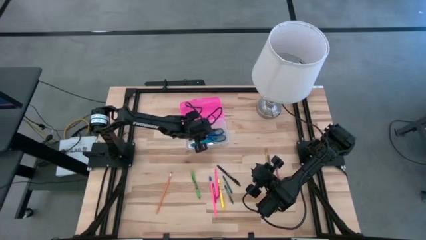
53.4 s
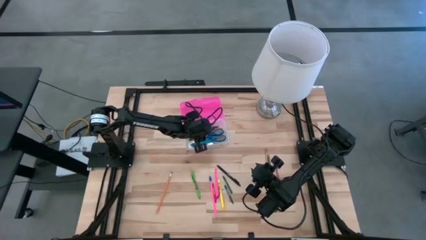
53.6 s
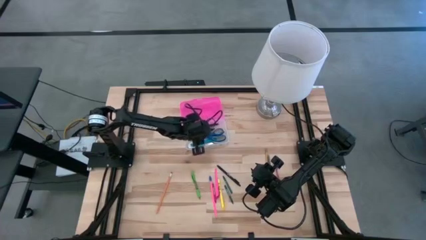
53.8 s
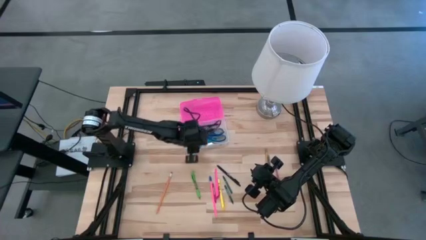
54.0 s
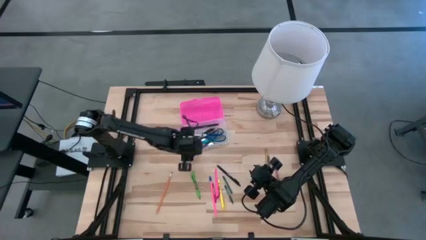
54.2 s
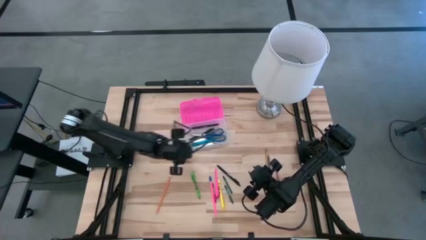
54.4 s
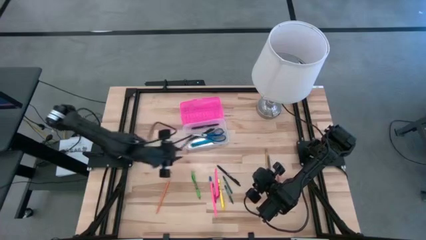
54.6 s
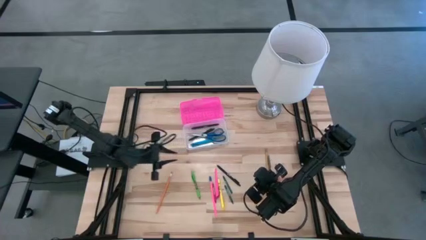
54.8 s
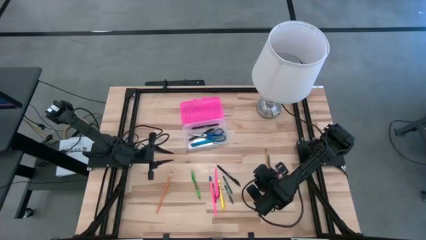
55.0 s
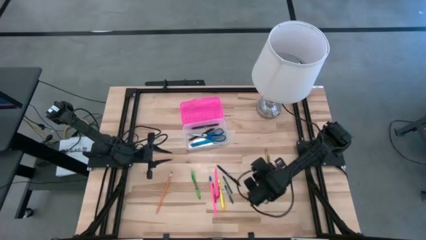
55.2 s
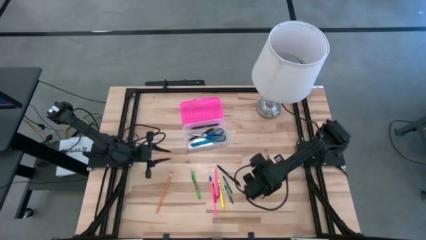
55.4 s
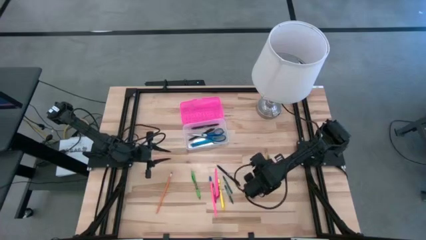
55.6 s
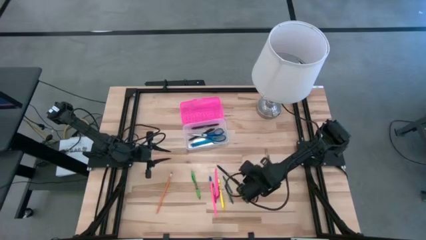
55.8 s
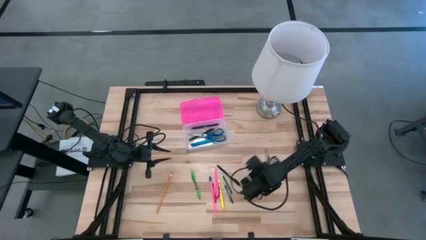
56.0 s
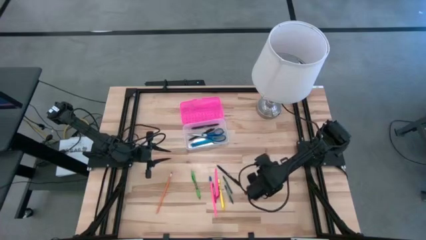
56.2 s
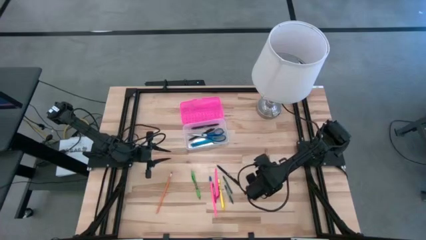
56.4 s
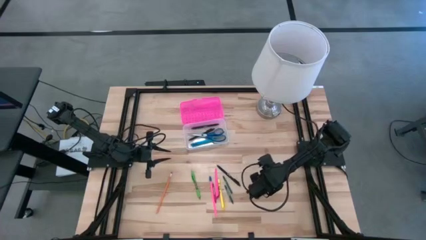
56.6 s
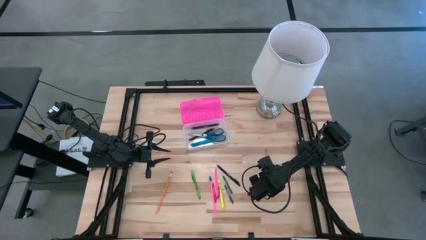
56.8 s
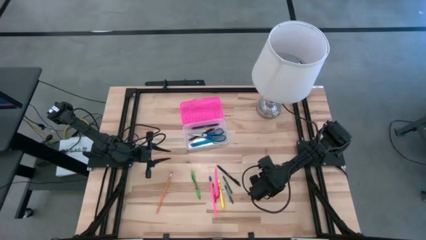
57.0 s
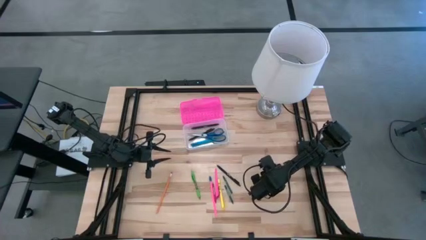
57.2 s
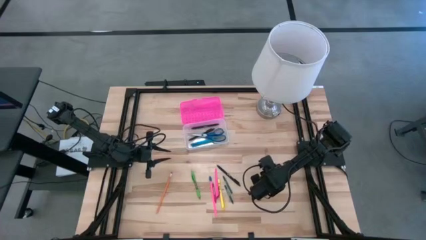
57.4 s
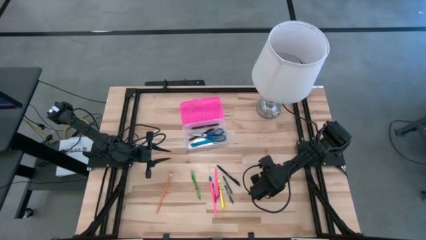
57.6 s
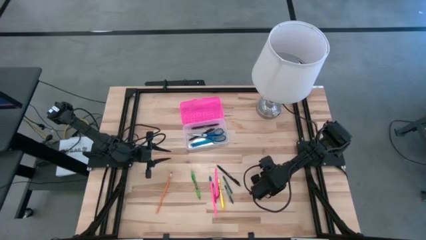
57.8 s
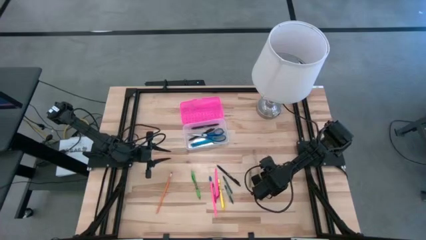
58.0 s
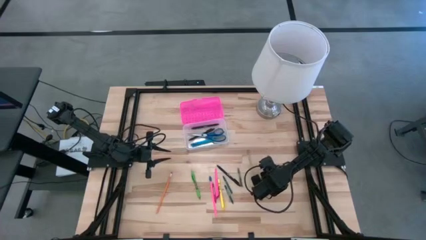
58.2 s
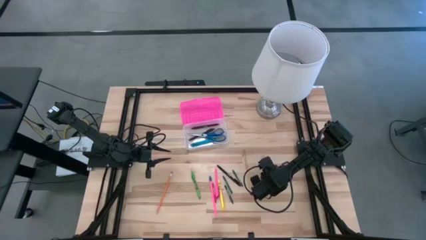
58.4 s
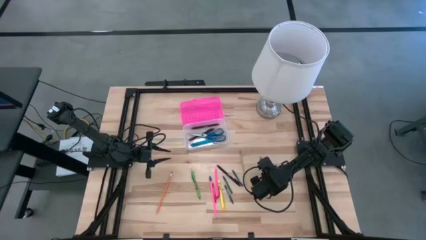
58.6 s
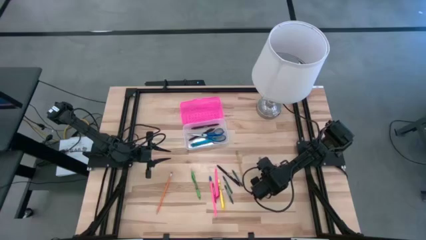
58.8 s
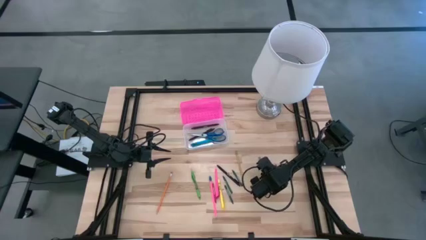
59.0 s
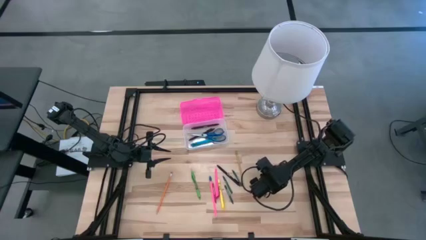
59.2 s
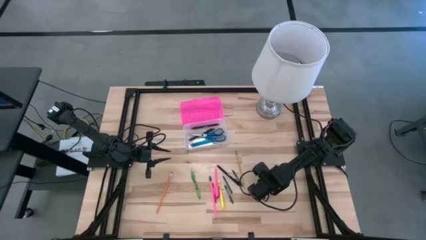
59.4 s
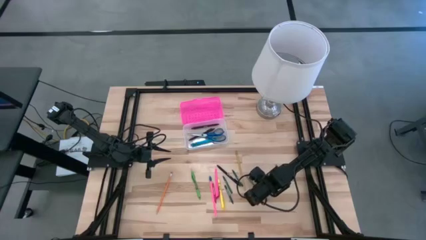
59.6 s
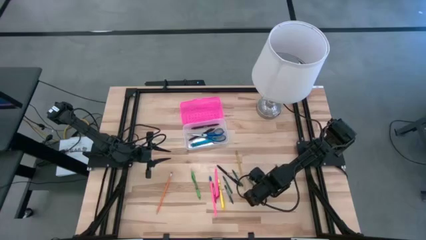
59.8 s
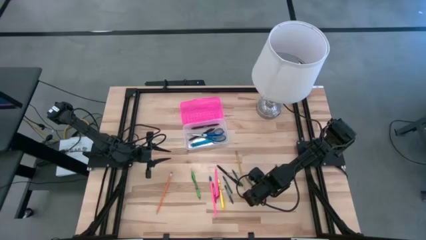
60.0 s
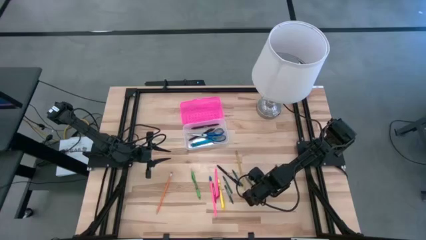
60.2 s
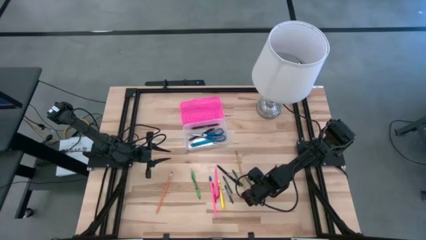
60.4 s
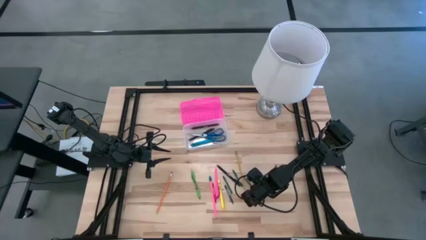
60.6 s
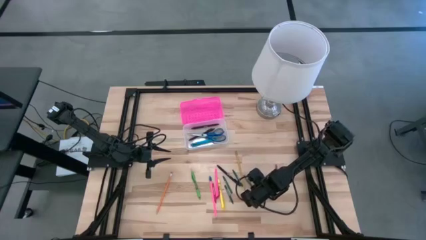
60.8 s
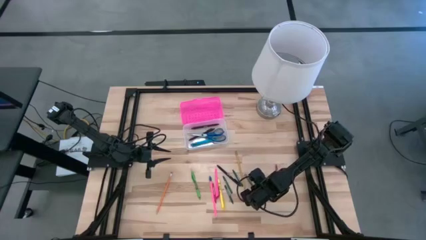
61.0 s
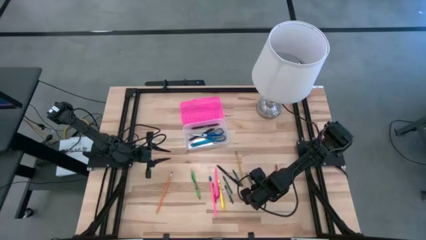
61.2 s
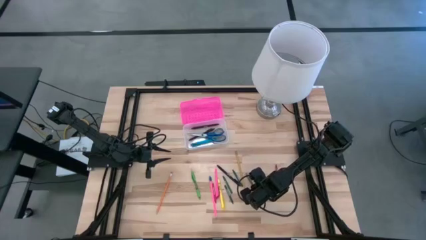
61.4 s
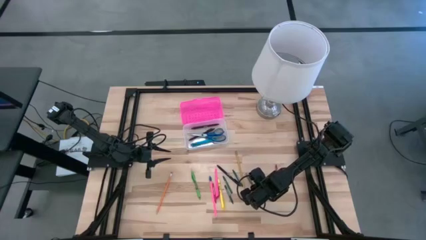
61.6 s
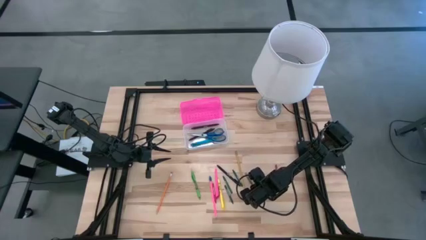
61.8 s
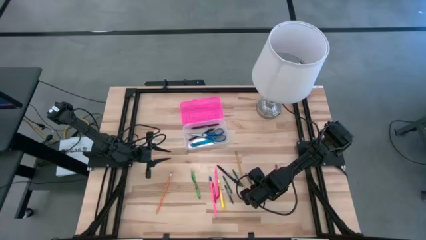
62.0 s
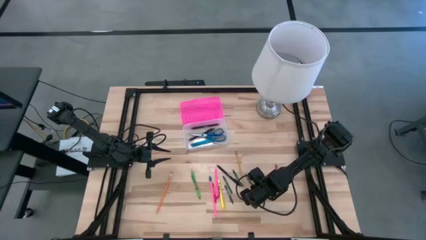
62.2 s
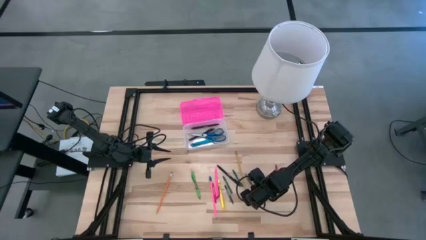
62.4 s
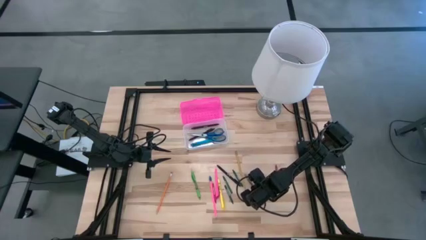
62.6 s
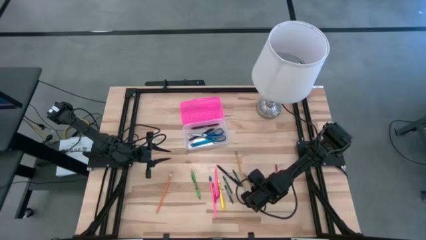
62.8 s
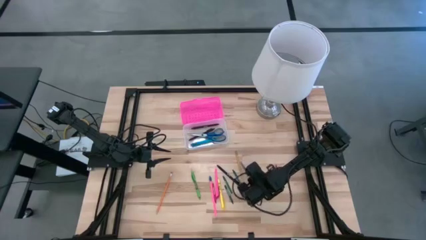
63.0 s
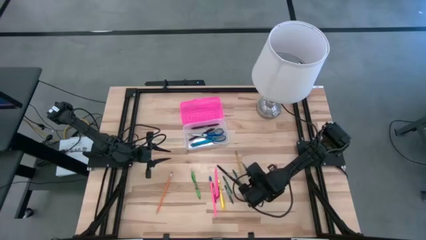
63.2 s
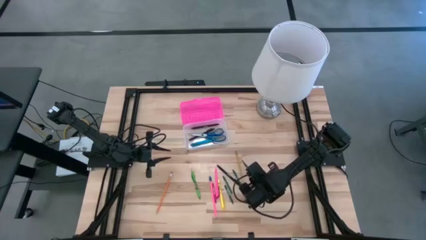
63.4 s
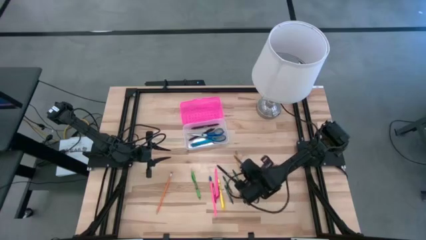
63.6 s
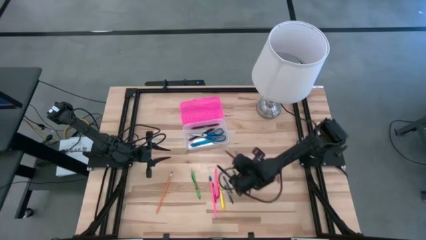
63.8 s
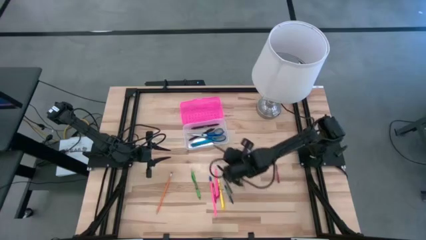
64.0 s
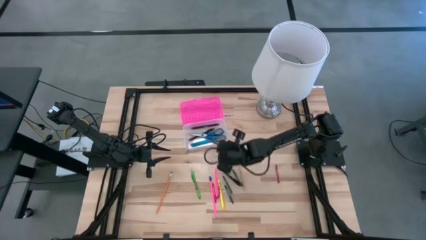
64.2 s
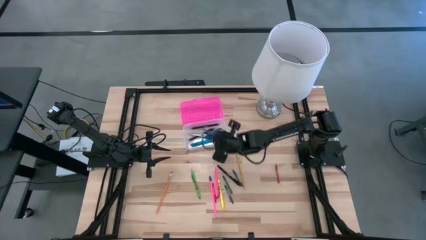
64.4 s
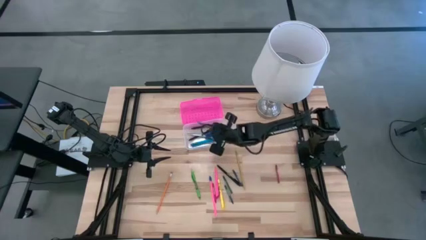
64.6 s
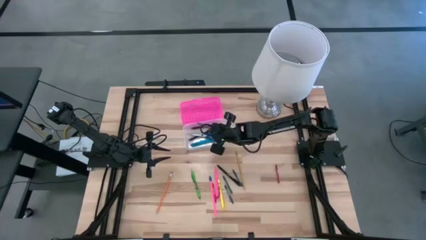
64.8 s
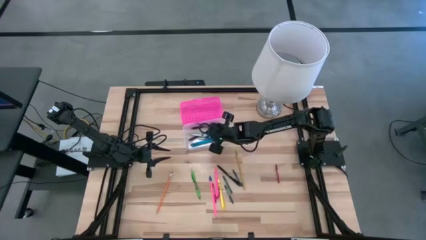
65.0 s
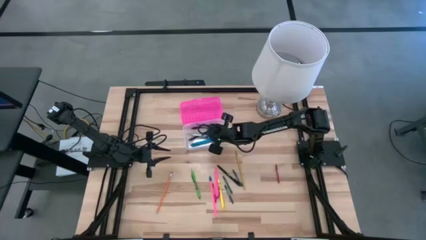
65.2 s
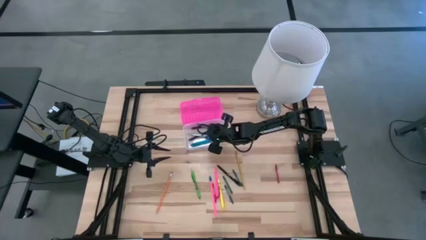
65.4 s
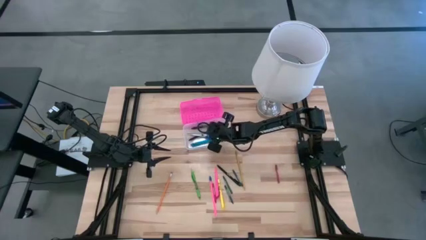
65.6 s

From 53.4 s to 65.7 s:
Task: Pick & place school supplies into a supply box
Put the gray pen into the pink supply box

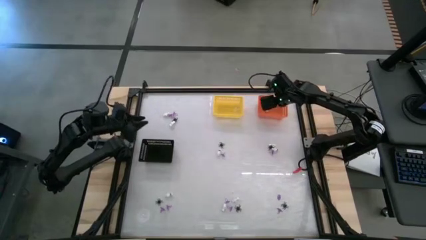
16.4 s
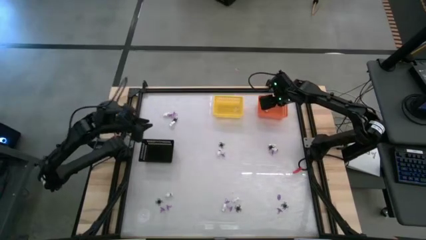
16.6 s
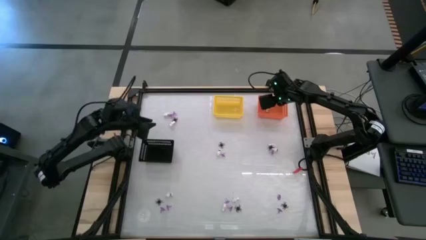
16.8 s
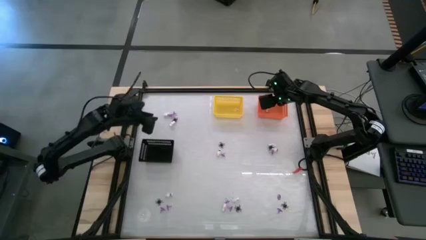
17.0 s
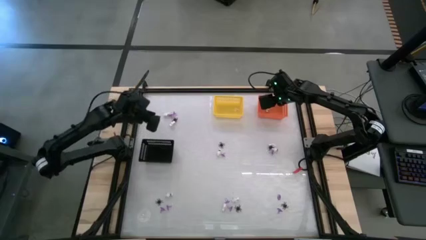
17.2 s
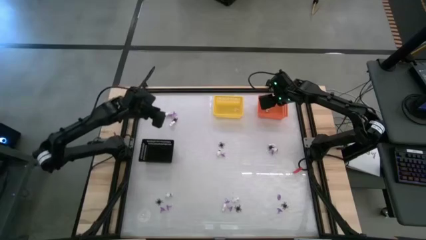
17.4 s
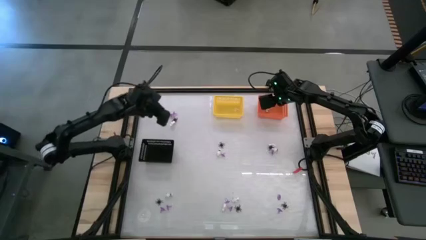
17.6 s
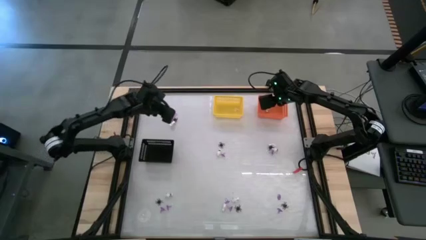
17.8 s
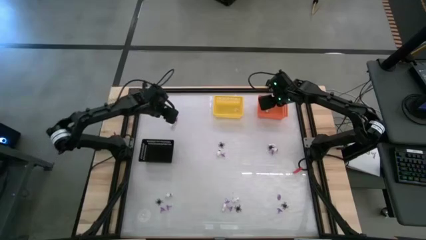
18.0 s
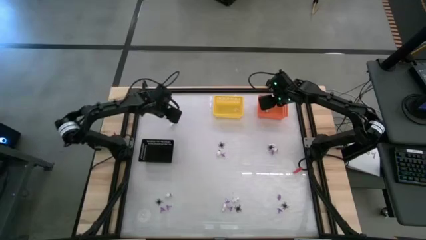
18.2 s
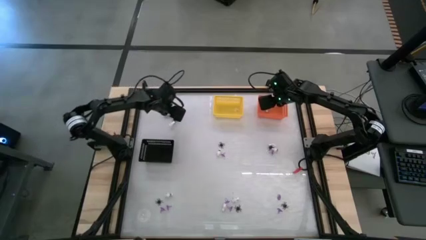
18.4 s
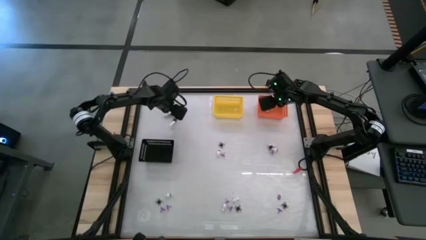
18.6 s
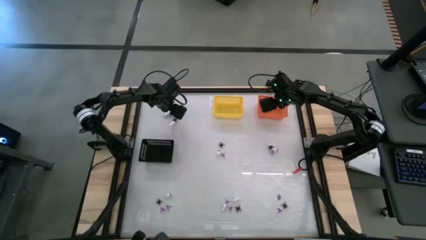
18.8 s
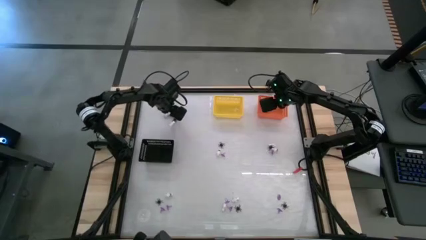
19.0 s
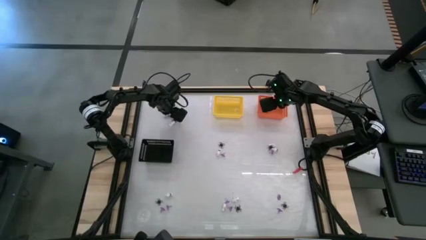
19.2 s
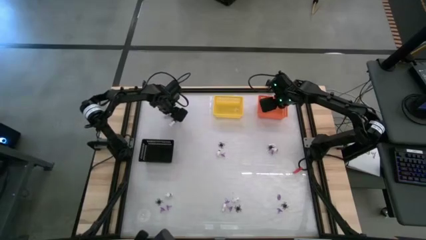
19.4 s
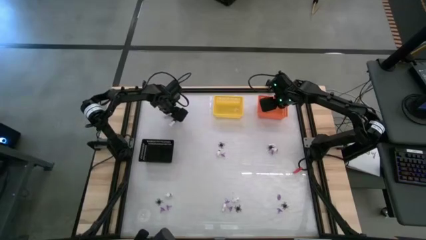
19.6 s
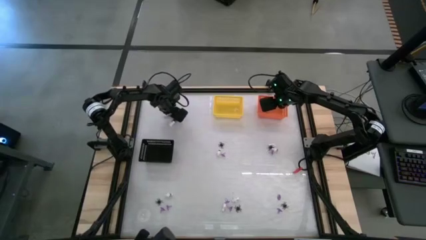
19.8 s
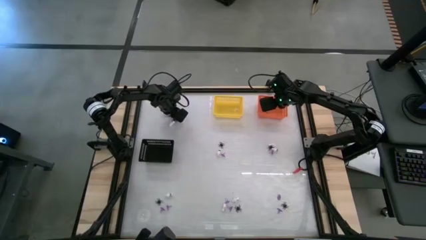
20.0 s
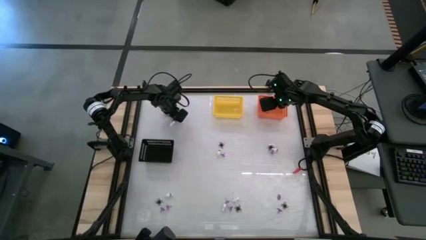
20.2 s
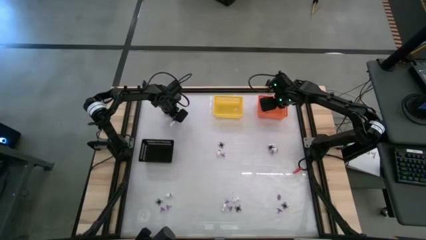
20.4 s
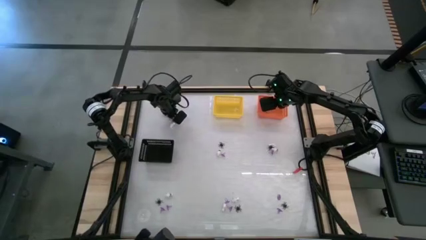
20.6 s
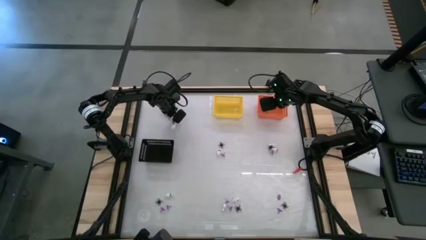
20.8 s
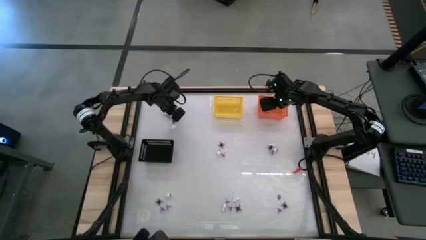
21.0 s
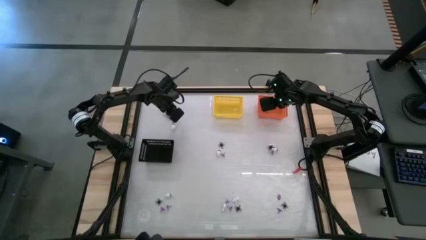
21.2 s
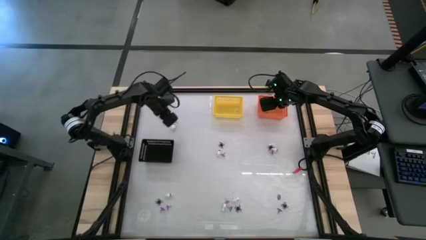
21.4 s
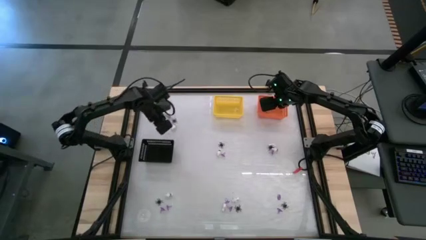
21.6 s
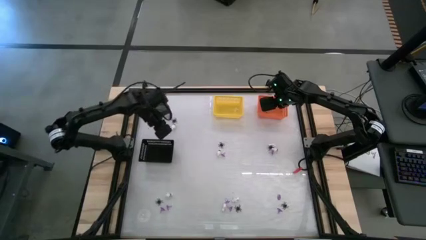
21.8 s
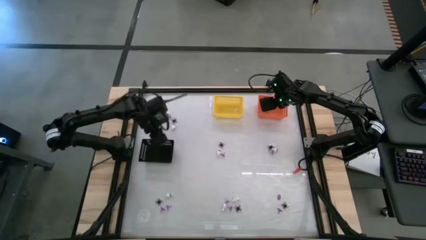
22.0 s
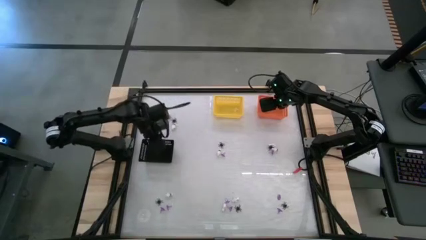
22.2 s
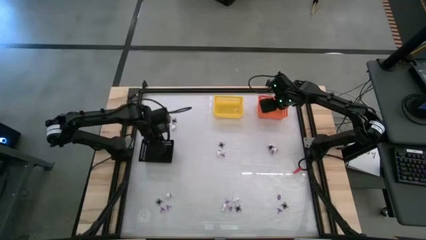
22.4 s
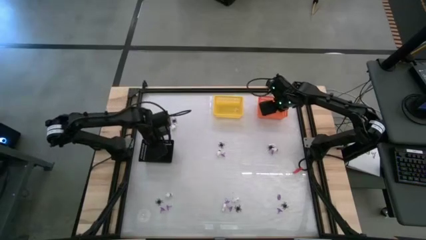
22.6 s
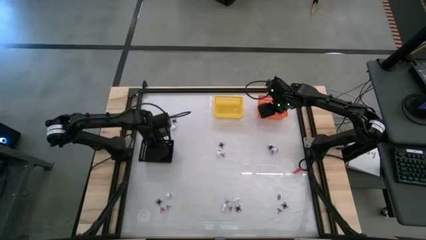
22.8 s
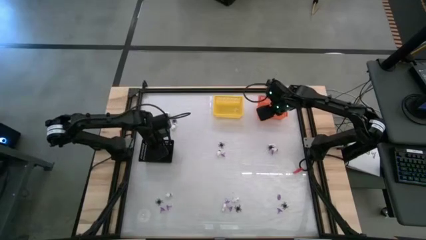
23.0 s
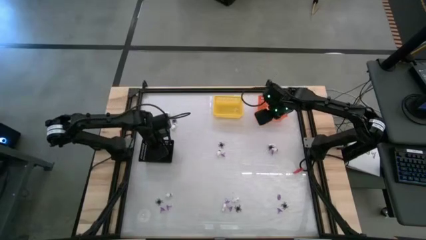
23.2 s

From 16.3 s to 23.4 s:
Task: Sort Halloween decoration
Put the purple witch hat toy into the black bin
